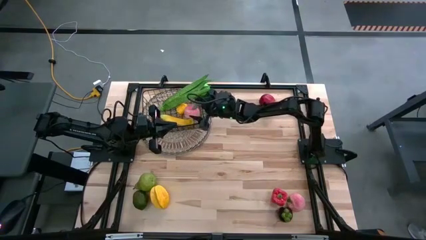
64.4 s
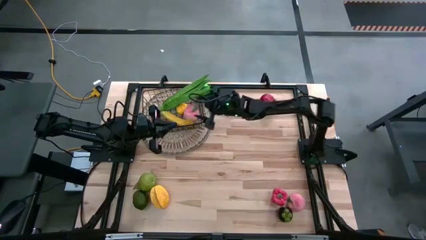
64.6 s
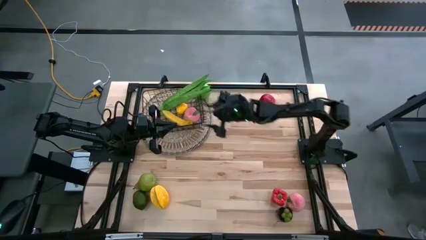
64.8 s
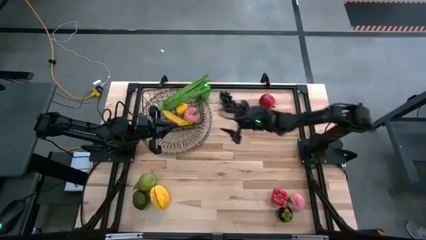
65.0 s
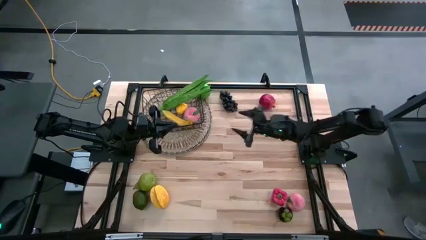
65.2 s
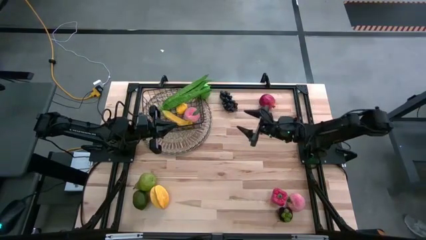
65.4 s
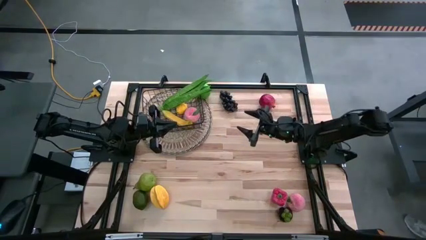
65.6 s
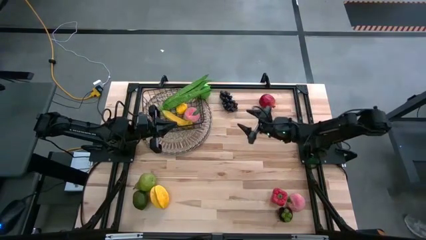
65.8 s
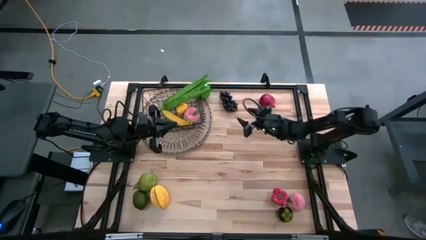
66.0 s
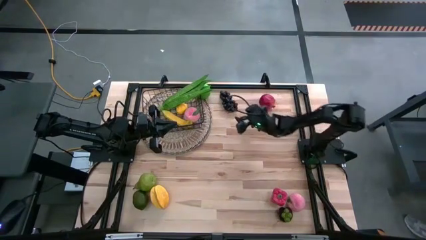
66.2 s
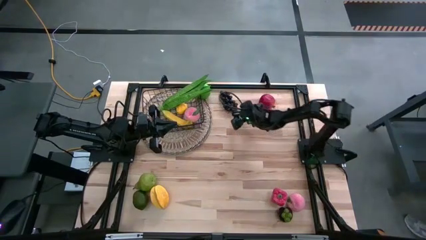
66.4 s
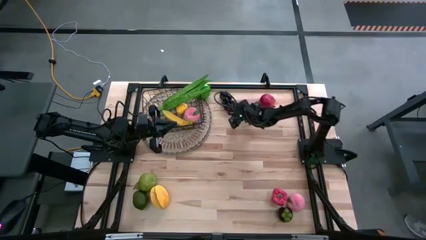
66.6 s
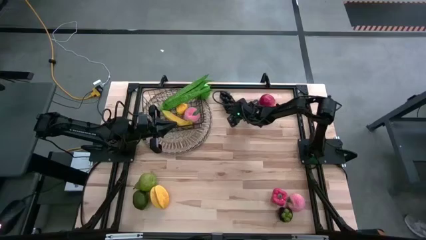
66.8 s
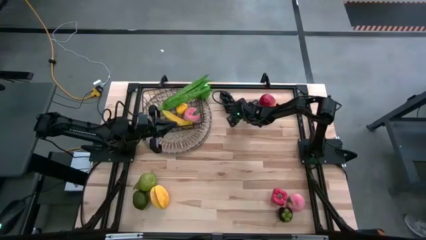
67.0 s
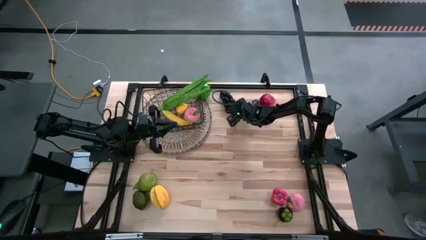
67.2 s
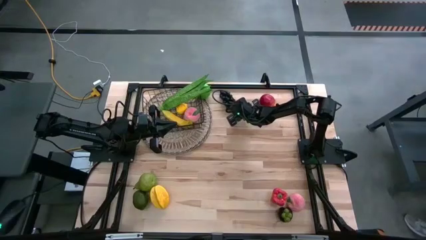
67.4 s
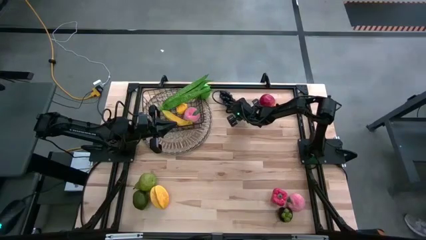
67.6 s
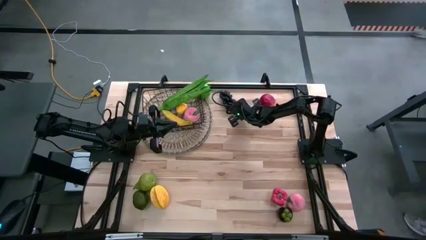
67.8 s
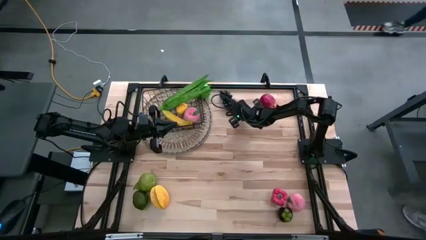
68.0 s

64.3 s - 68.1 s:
Task: Build produce basket
Put the black grapes into the wire basket

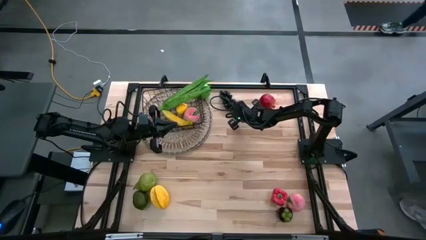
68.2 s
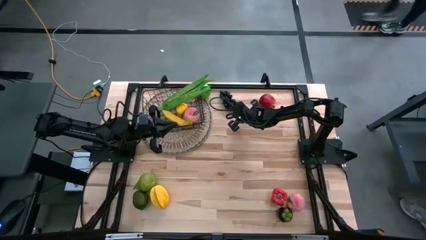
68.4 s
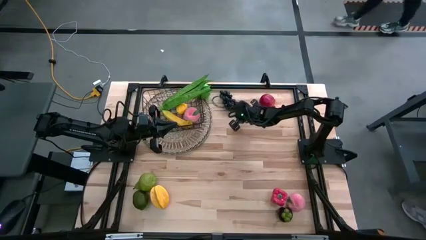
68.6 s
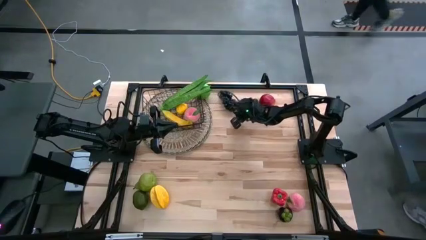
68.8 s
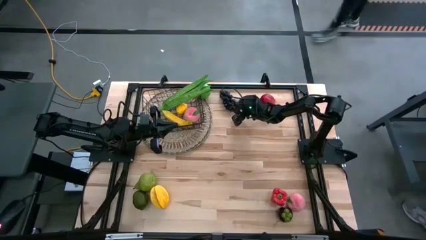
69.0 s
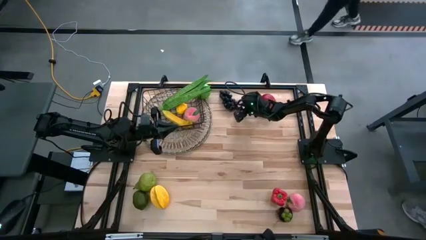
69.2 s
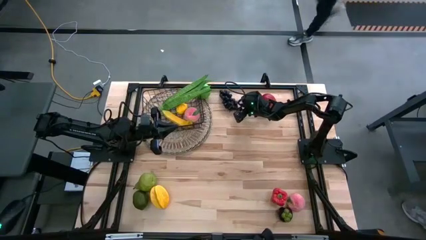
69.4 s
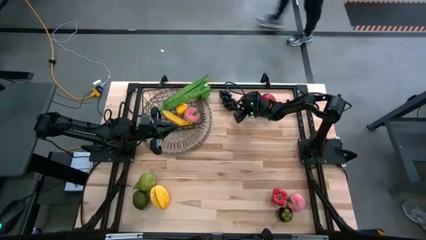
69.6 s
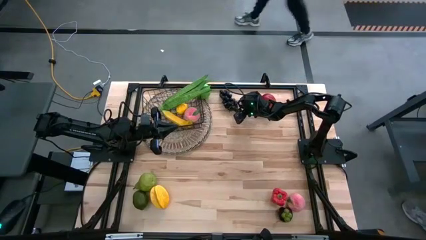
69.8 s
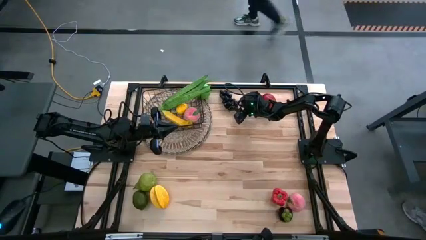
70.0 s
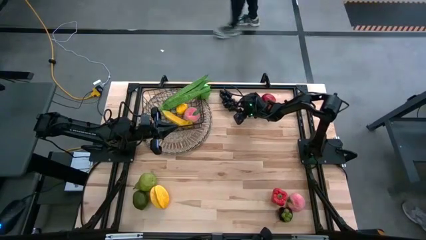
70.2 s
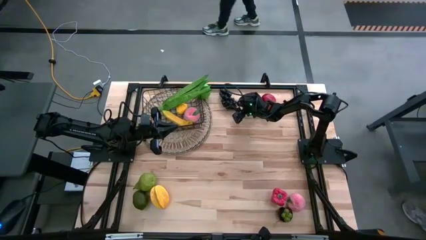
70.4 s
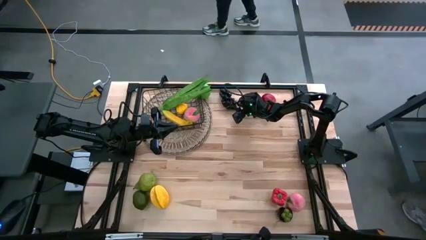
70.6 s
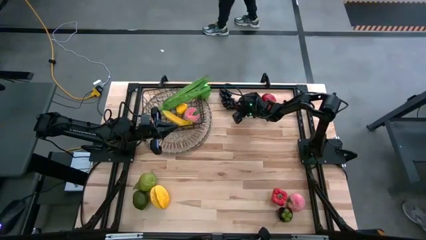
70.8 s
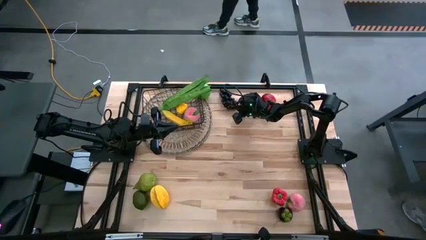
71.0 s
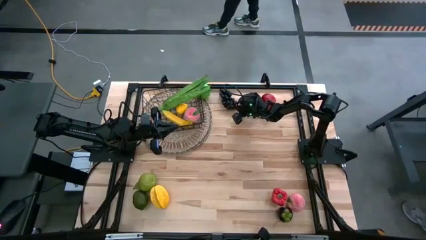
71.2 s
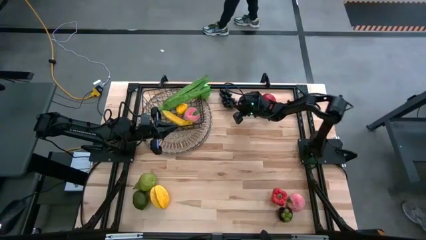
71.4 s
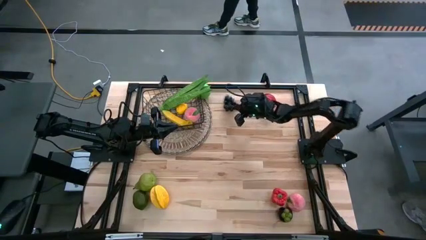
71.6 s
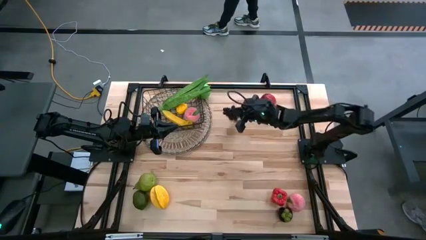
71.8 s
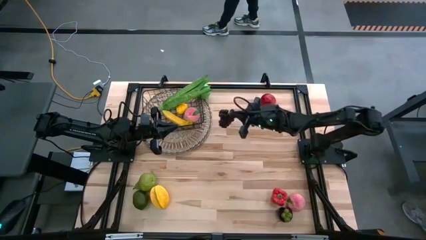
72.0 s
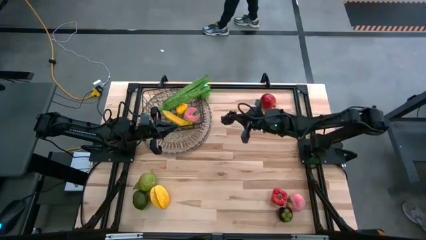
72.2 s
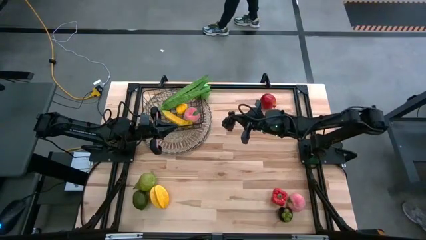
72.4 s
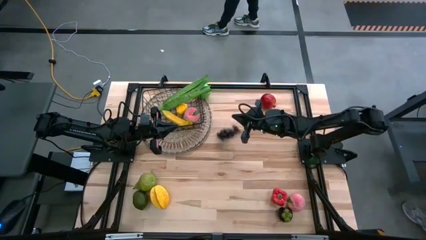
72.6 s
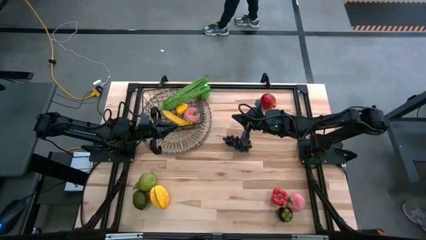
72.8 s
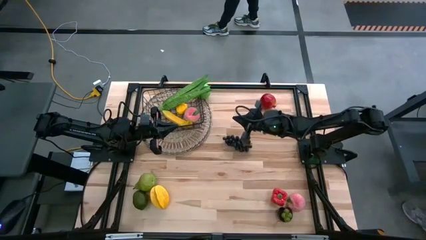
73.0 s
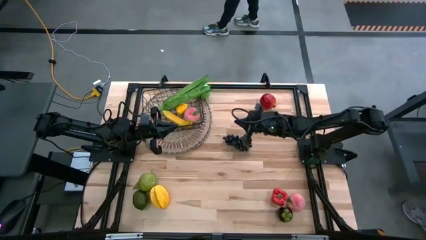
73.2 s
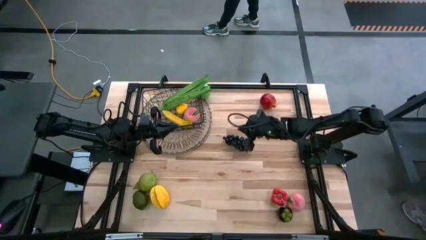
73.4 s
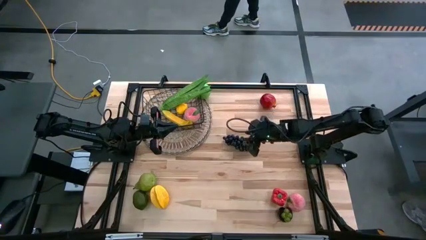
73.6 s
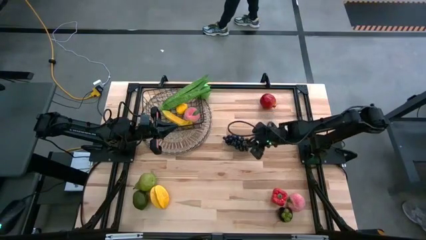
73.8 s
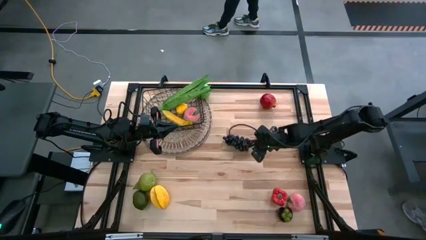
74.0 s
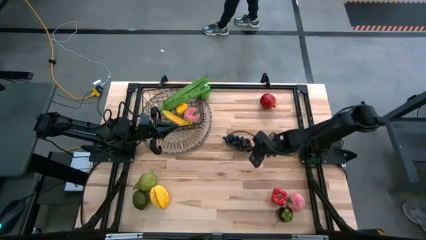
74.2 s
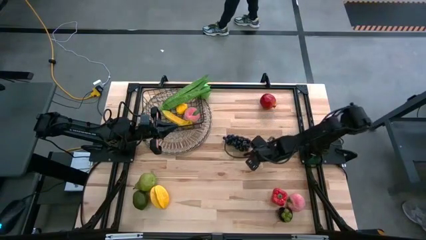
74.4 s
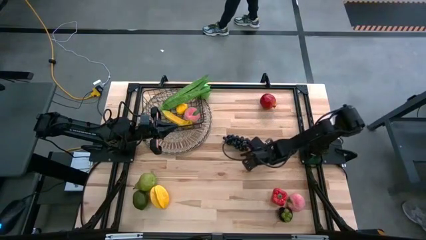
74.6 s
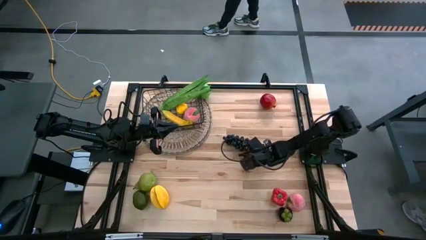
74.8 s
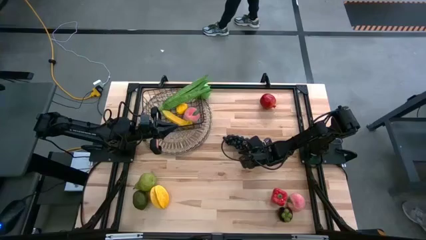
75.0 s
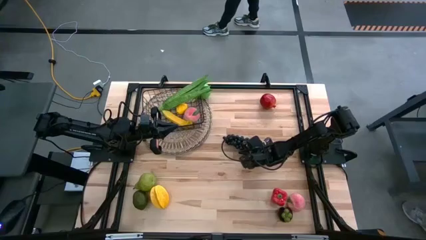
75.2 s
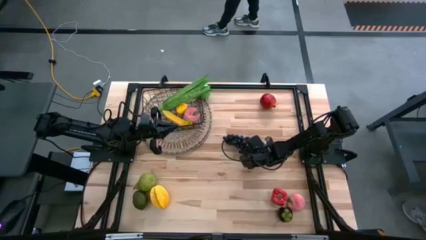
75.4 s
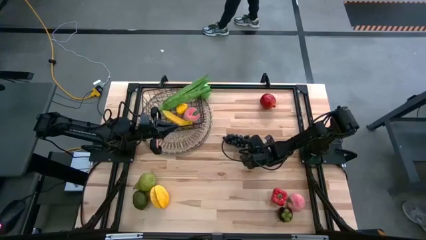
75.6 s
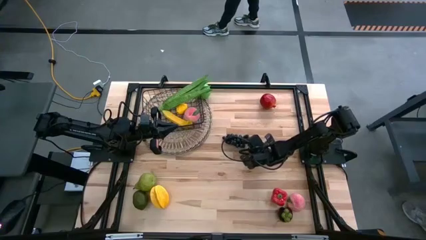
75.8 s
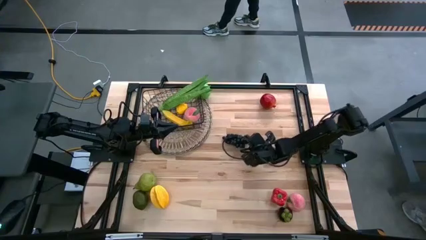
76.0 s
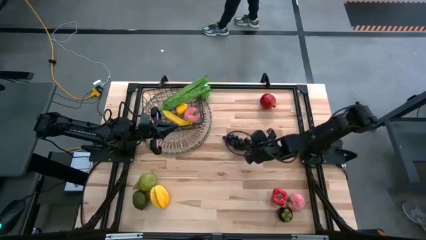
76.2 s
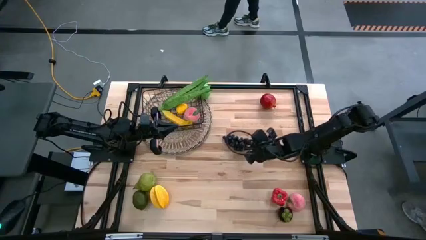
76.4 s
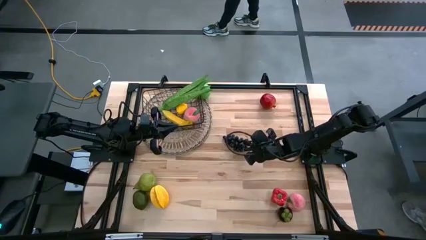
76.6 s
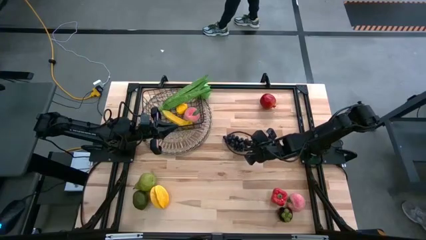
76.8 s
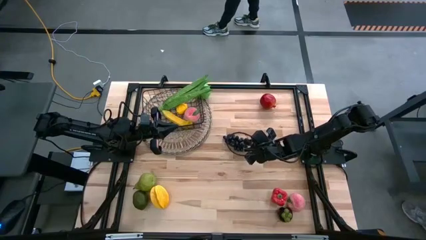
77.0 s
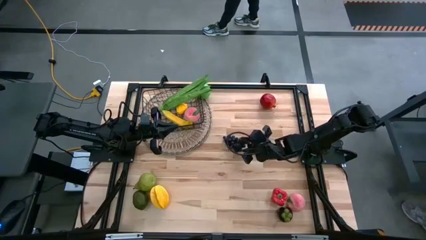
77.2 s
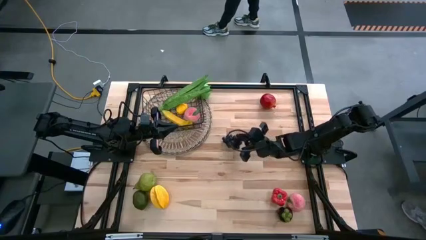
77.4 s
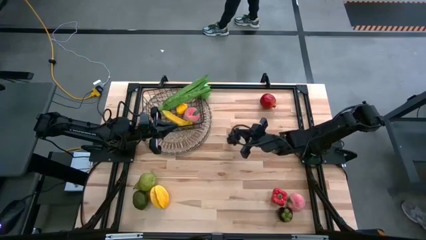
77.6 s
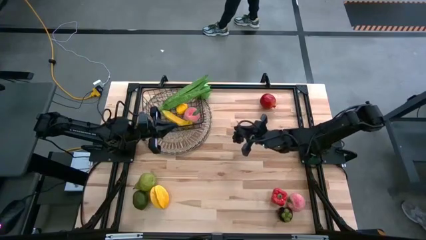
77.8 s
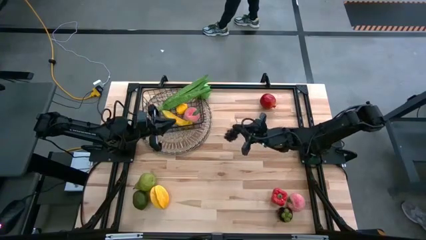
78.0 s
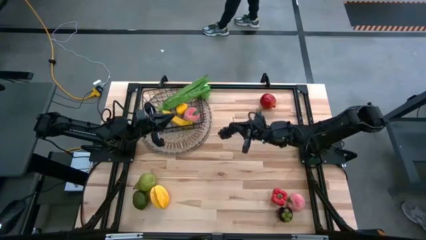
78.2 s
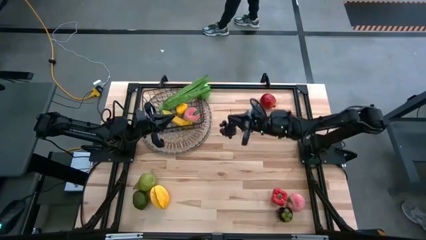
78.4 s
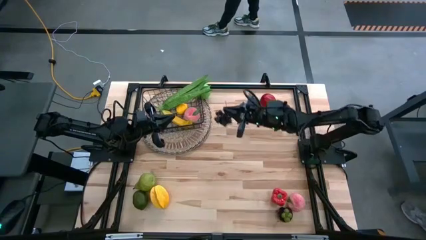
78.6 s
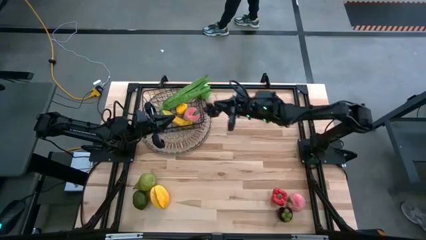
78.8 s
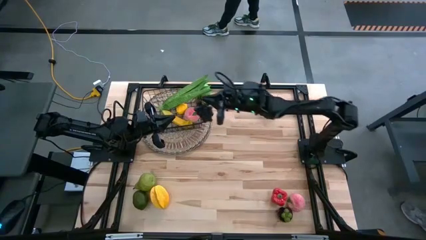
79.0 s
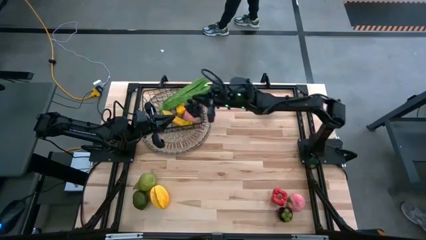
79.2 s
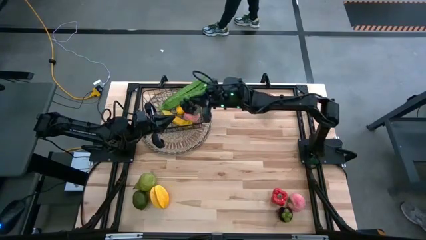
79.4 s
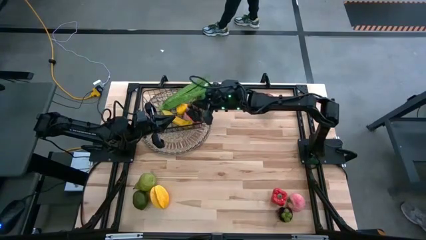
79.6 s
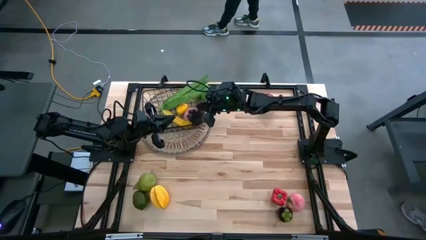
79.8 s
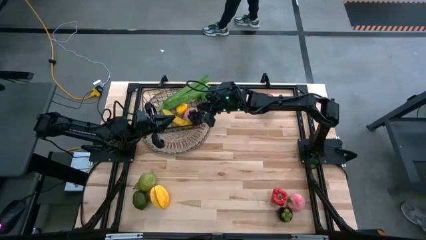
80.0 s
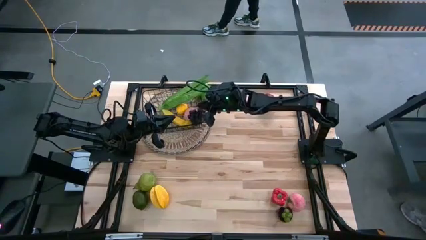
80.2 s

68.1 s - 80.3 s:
Put the black grapes into the wire basket
